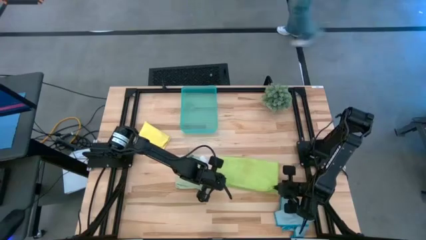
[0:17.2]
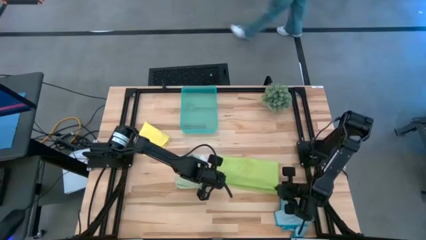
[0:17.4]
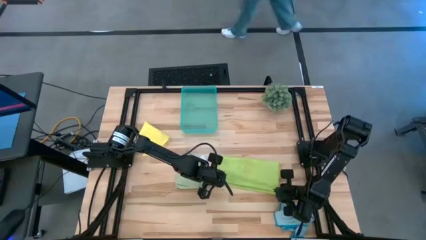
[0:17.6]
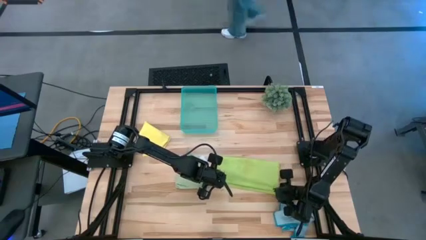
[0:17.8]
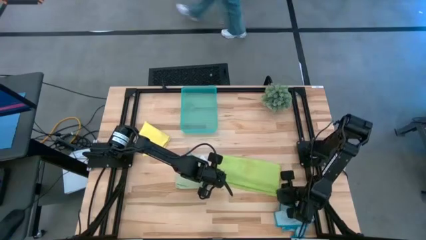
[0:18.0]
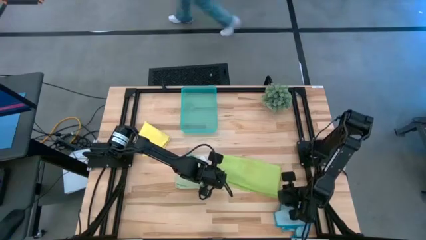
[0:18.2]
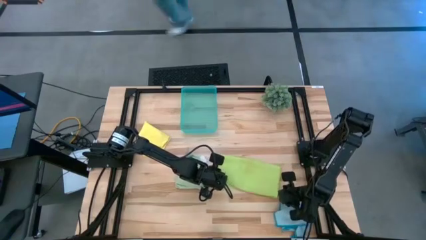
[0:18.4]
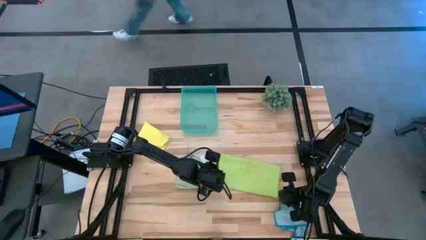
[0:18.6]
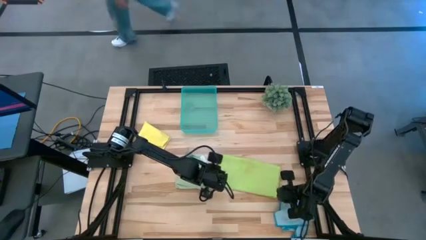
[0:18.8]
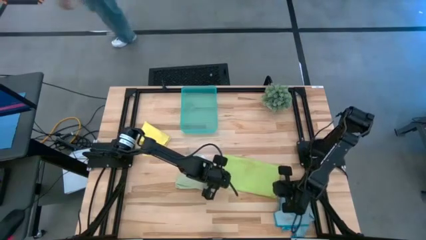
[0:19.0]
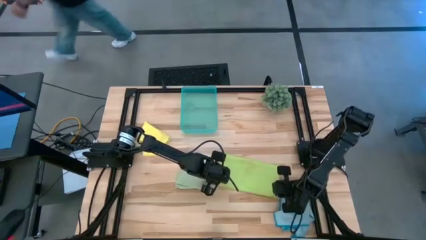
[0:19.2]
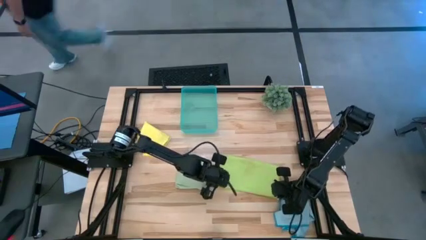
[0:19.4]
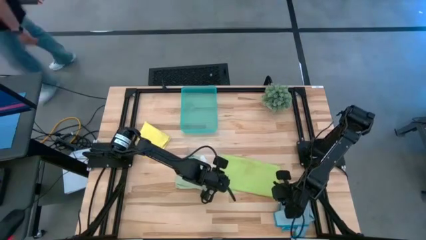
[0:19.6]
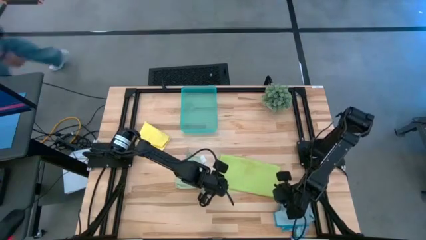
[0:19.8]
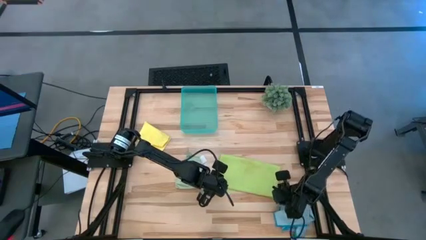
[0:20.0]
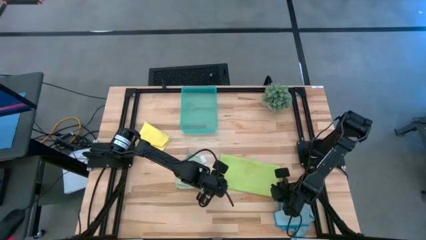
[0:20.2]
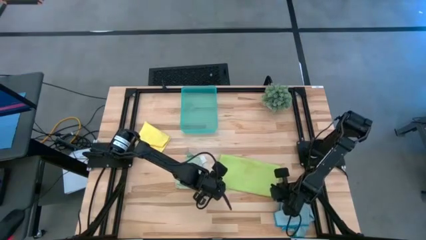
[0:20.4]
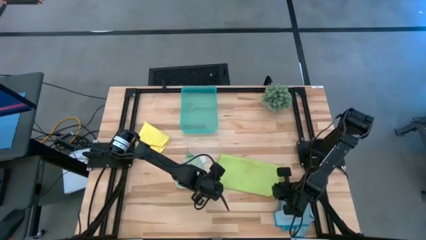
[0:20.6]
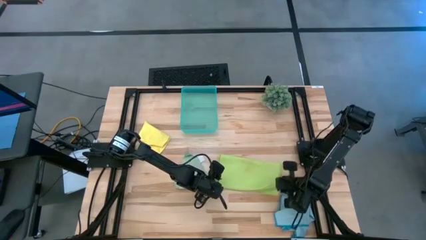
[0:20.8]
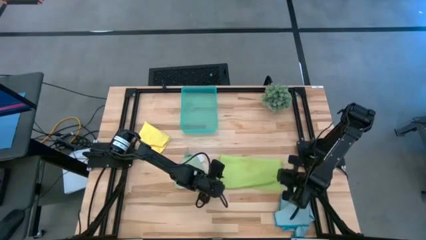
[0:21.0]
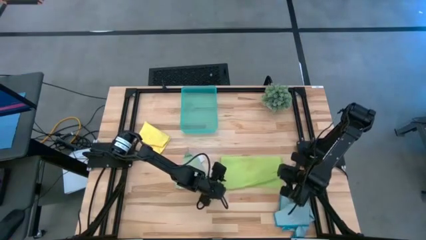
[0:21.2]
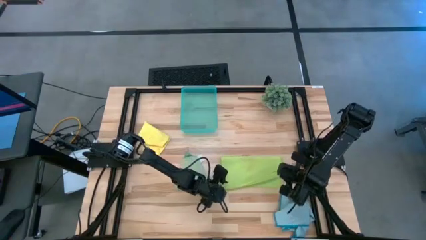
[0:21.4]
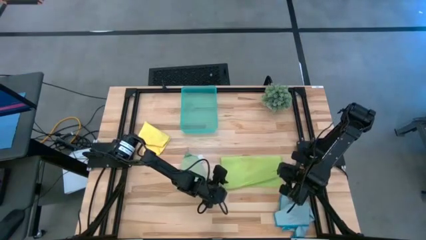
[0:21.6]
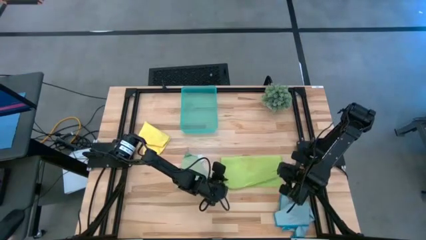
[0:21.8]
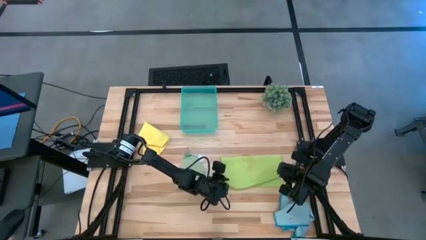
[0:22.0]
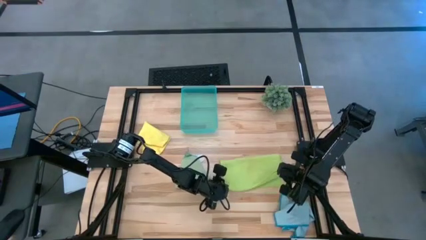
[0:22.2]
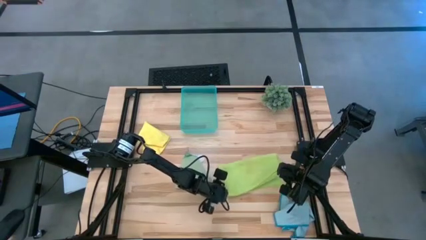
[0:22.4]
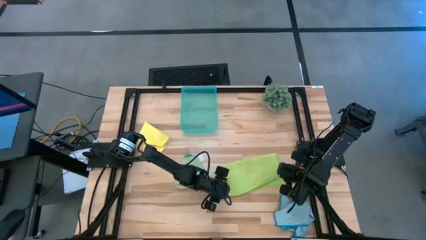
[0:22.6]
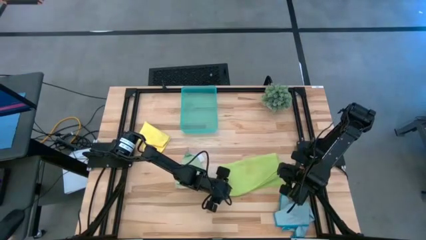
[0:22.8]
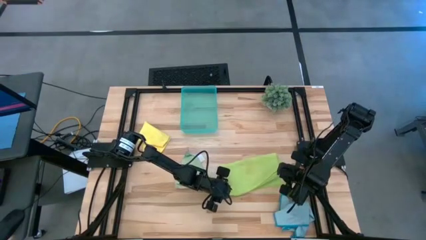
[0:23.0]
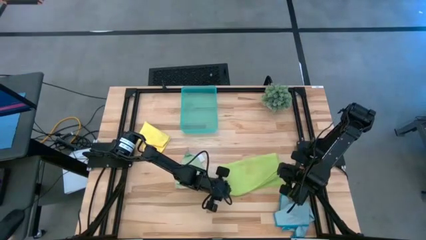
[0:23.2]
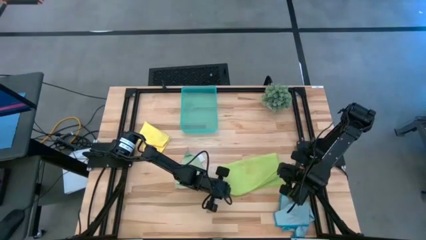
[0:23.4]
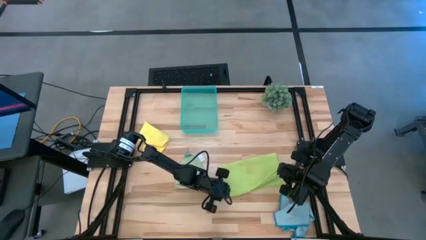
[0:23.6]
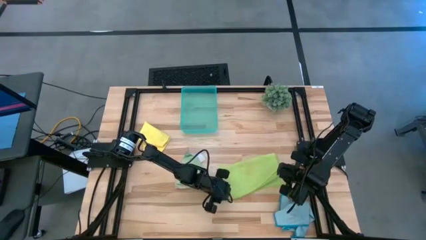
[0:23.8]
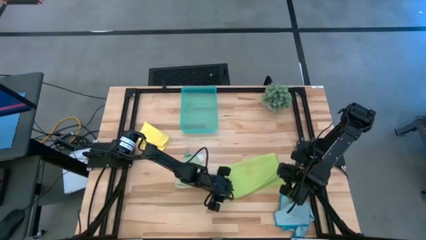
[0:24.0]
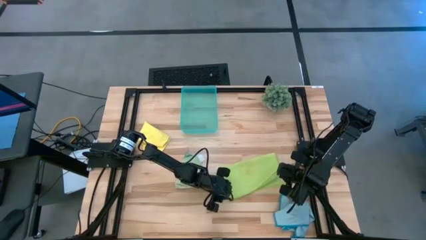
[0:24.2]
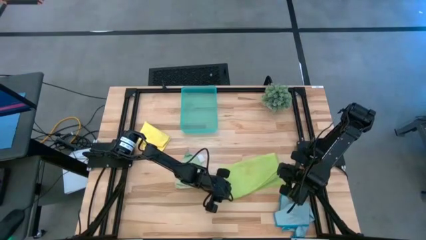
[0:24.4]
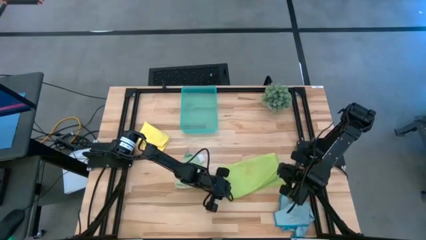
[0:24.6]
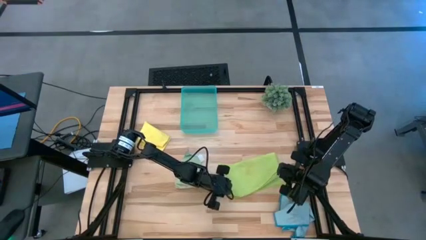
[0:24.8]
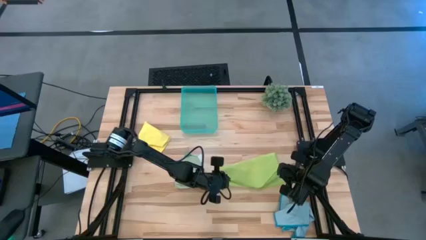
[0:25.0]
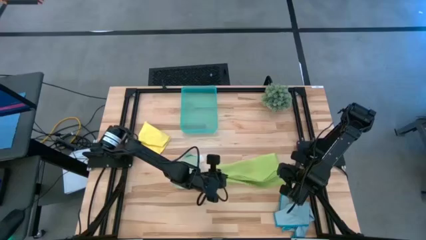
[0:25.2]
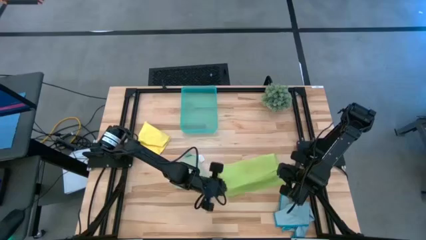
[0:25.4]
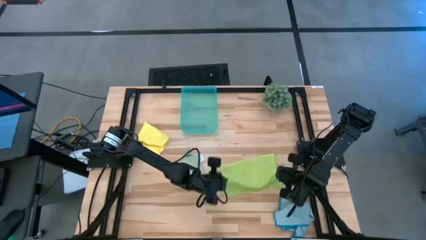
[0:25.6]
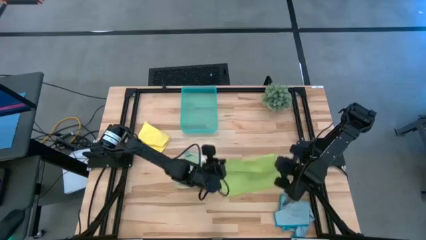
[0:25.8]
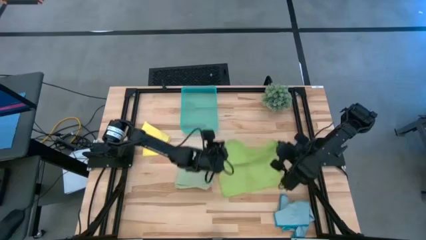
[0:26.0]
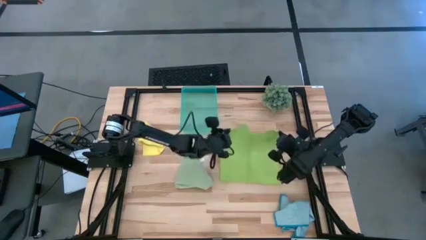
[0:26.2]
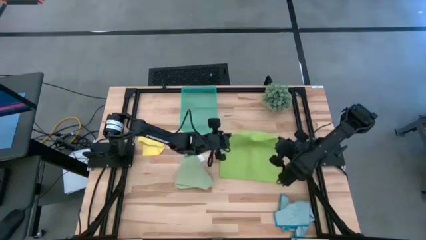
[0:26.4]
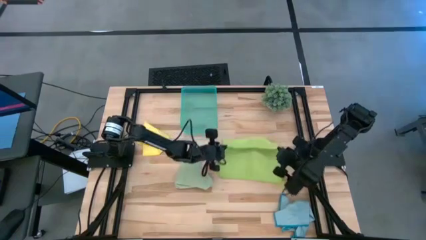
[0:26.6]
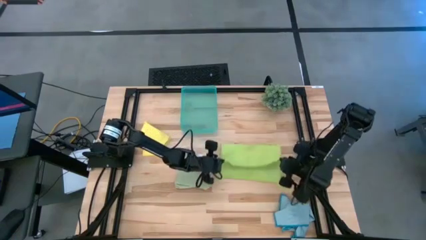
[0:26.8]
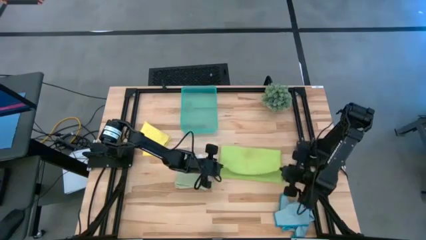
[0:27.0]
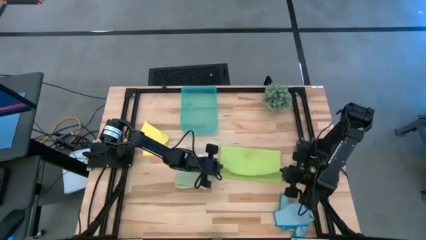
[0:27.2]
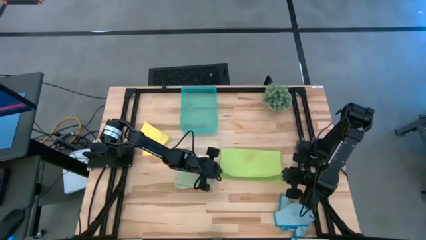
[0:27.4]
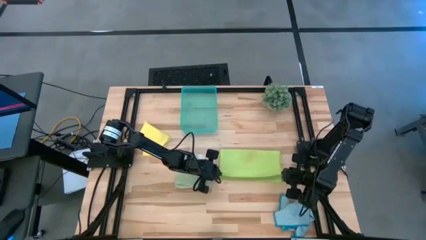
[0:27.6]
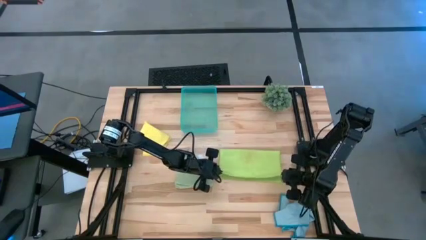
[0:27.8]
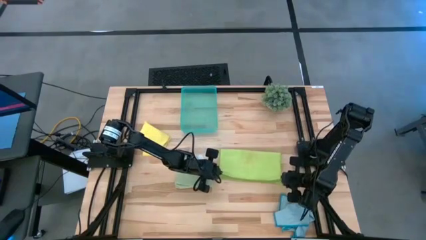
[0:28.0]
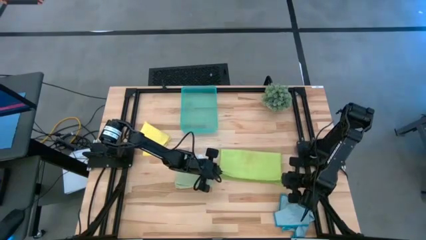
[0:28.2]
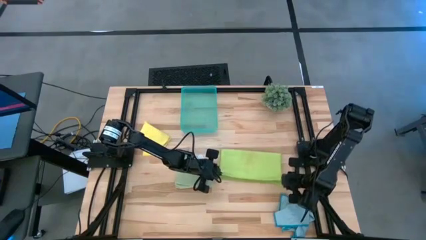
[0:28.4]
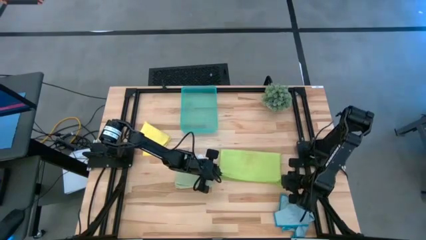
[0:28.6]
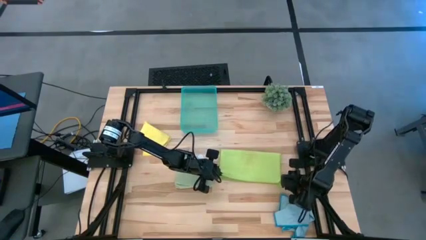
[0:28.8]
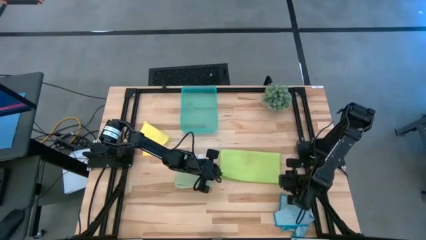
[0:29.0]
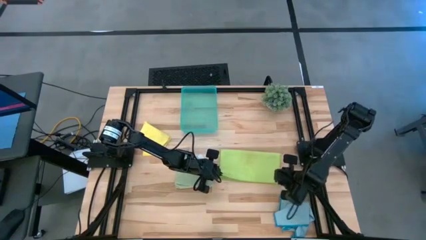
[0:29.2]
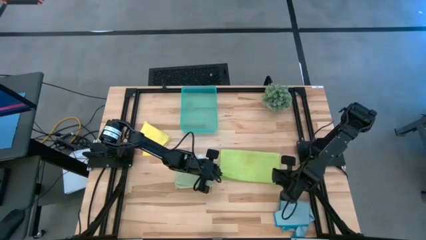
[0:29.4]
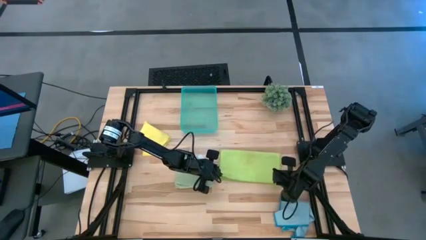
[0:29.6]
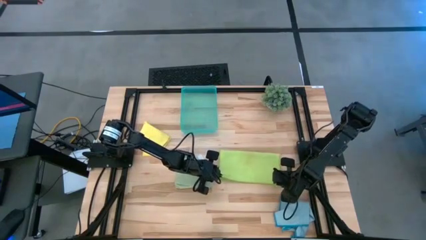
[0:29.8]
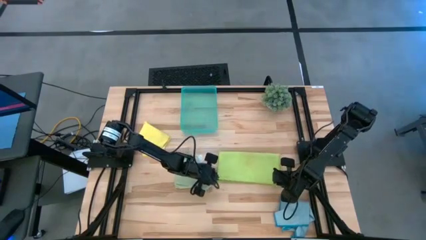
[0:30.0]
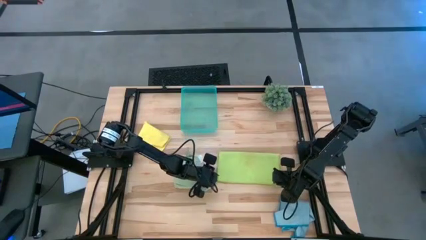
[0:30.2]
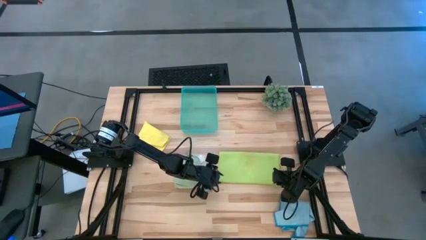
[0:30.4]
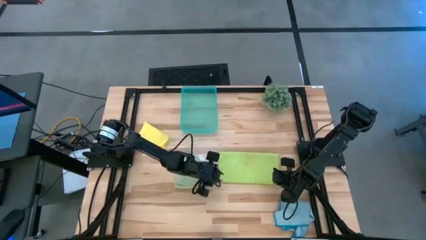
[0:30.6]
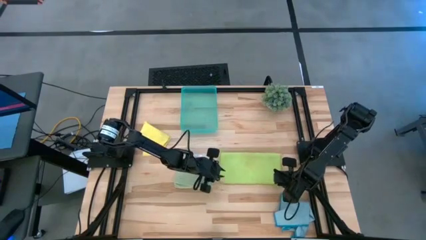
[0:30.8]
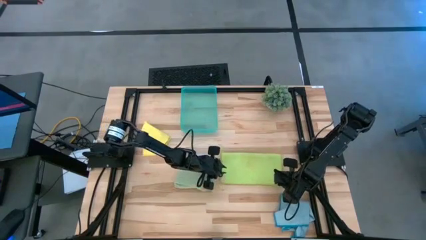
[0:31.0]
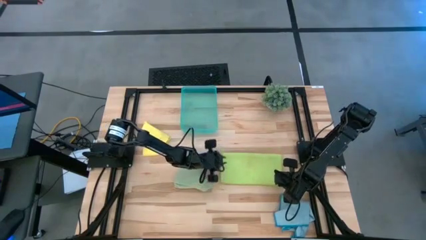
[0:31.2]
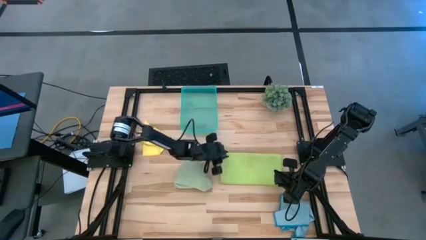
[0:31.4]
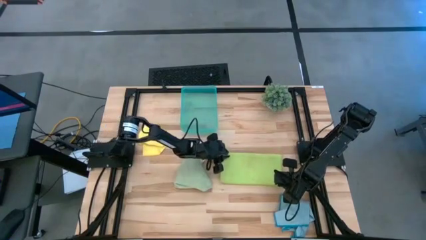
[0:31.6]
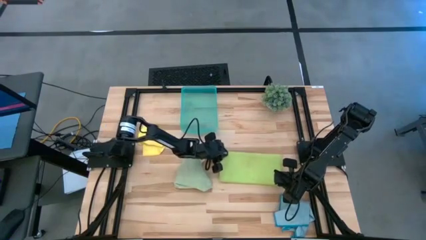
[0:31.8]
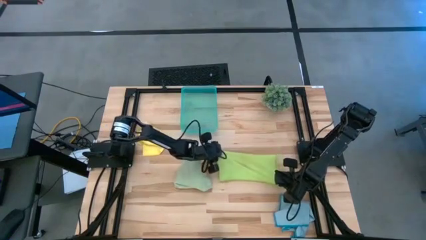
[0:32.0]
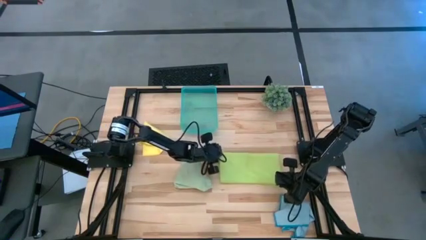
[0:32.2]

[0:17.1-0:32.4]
Task: Fold microfiber towels
Fold the light green microfiber cloth
